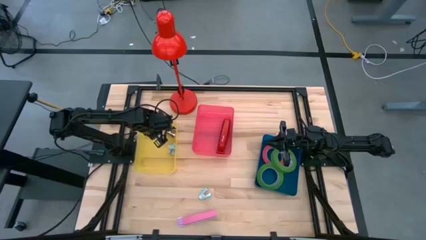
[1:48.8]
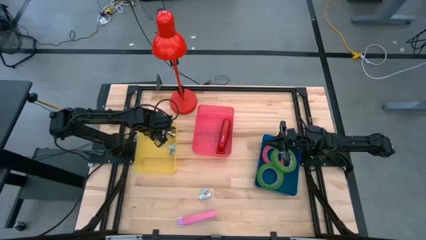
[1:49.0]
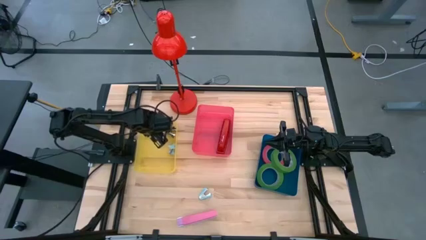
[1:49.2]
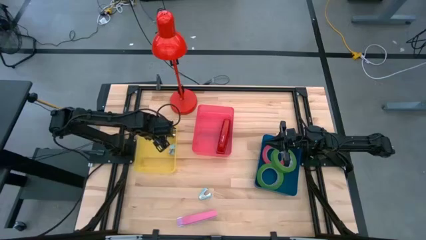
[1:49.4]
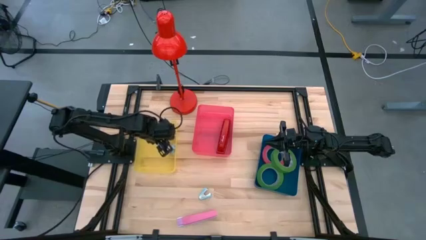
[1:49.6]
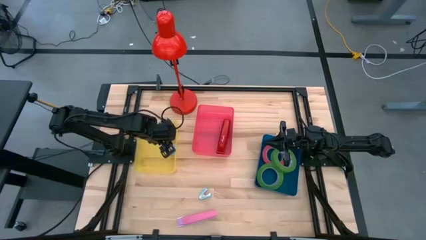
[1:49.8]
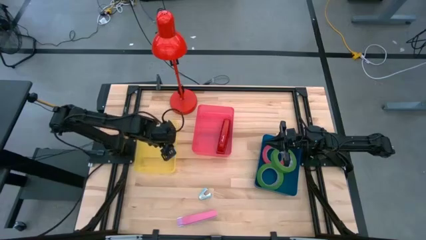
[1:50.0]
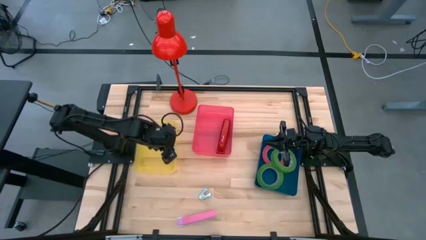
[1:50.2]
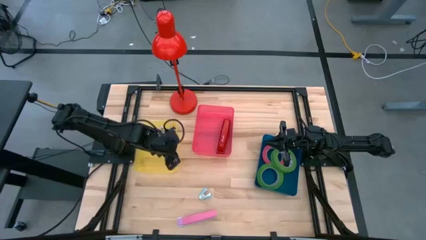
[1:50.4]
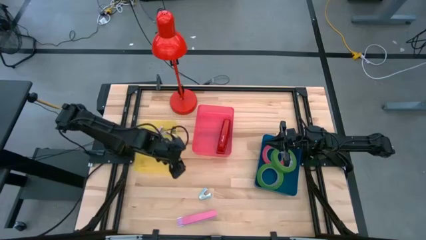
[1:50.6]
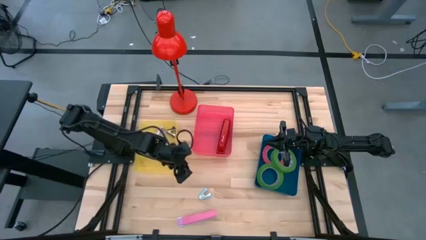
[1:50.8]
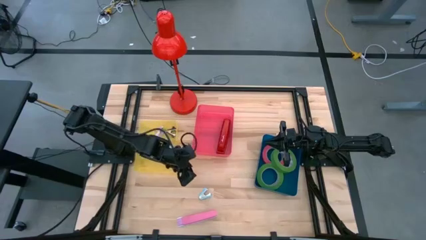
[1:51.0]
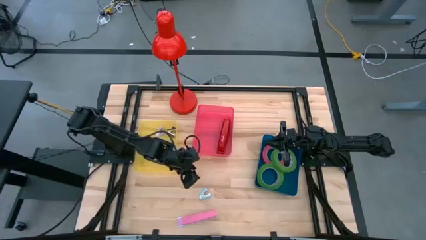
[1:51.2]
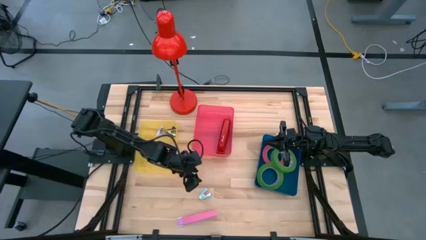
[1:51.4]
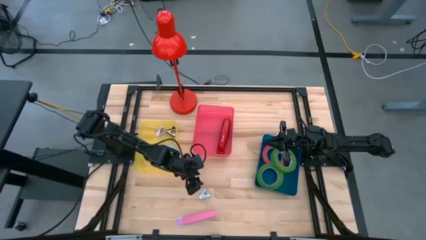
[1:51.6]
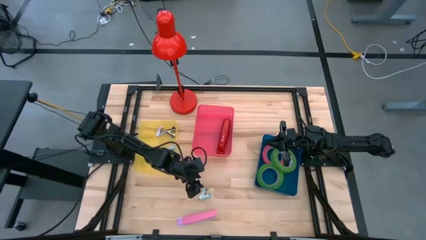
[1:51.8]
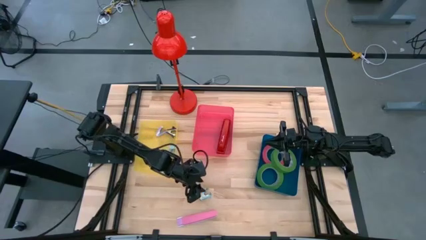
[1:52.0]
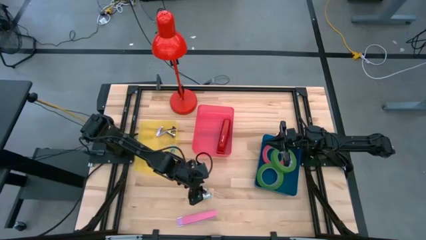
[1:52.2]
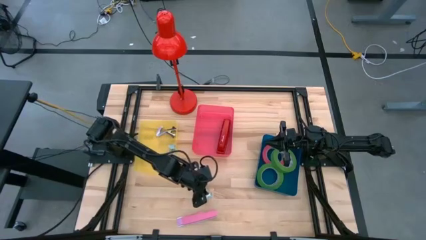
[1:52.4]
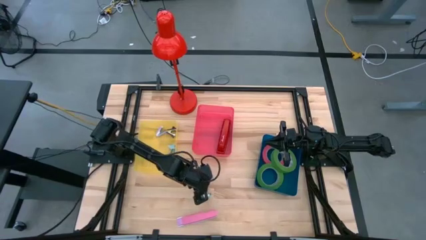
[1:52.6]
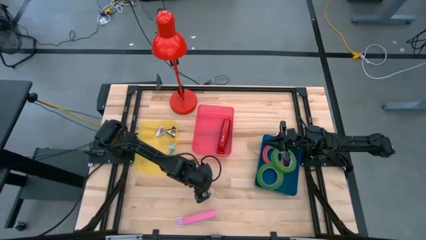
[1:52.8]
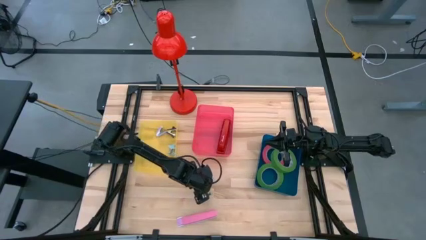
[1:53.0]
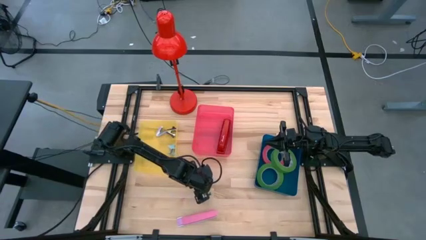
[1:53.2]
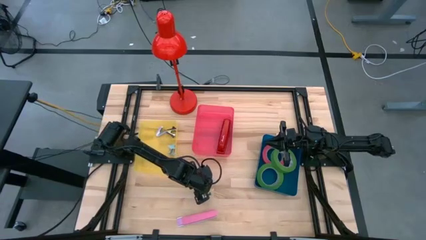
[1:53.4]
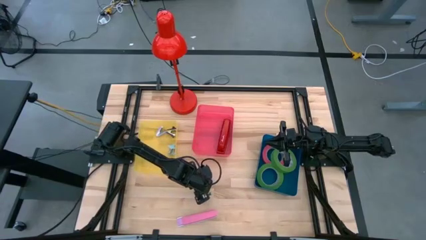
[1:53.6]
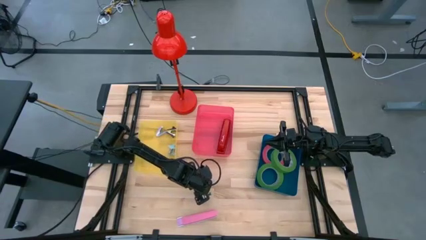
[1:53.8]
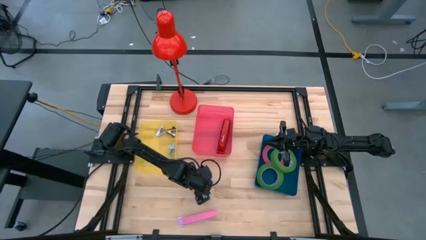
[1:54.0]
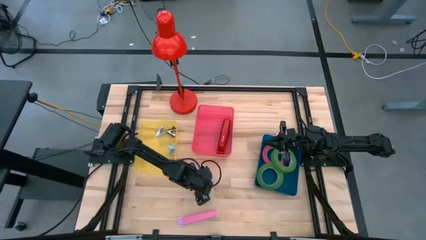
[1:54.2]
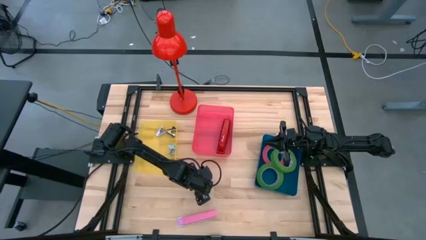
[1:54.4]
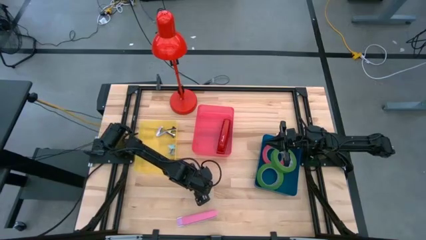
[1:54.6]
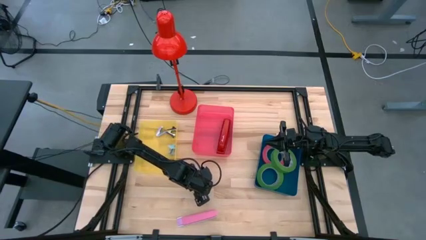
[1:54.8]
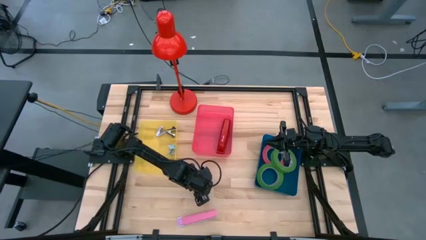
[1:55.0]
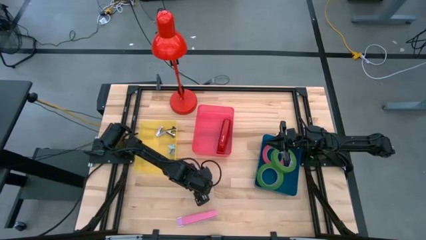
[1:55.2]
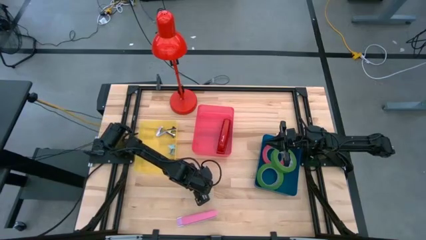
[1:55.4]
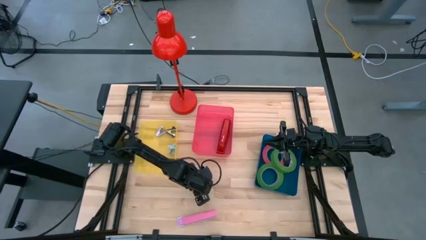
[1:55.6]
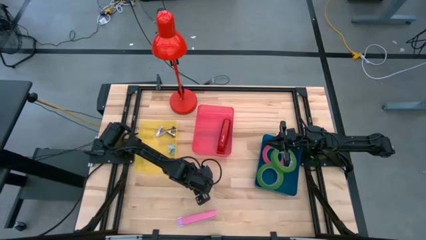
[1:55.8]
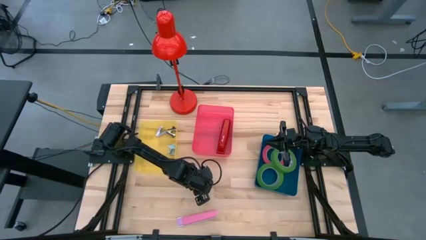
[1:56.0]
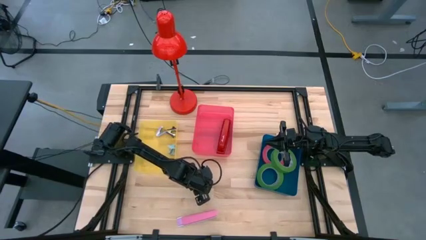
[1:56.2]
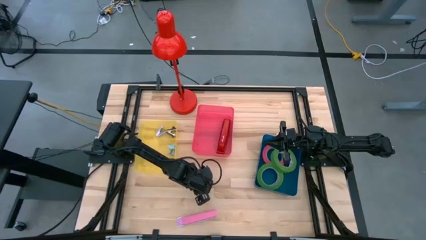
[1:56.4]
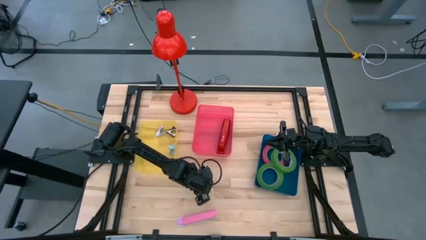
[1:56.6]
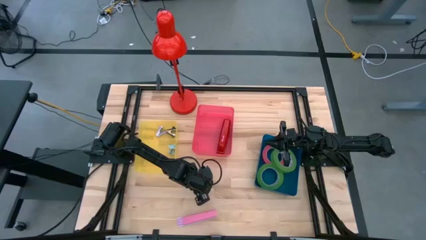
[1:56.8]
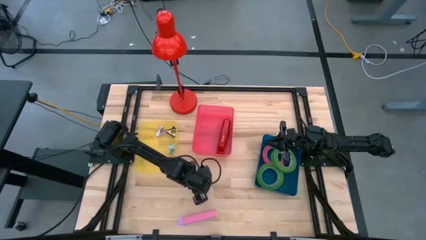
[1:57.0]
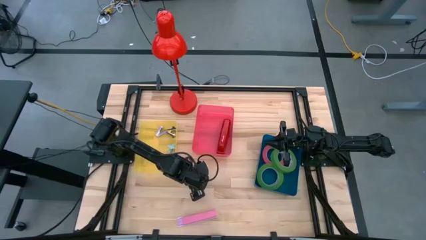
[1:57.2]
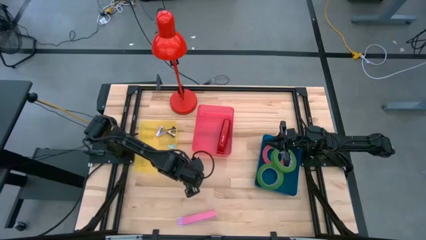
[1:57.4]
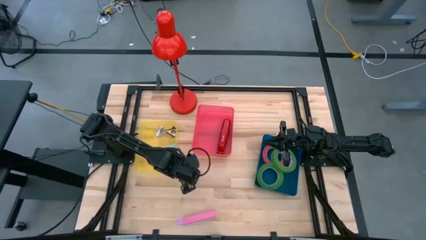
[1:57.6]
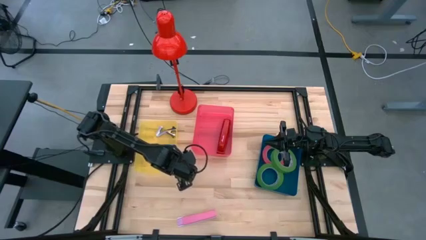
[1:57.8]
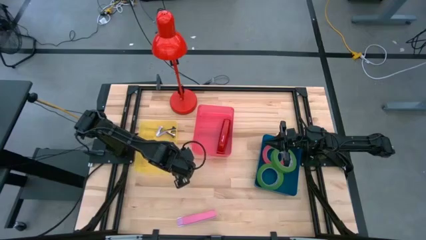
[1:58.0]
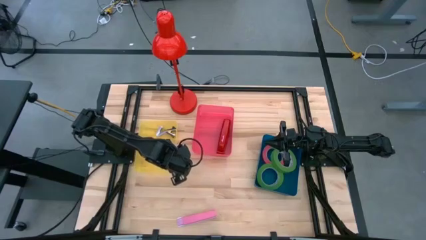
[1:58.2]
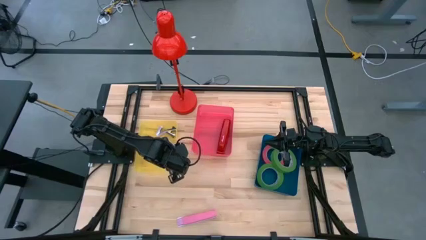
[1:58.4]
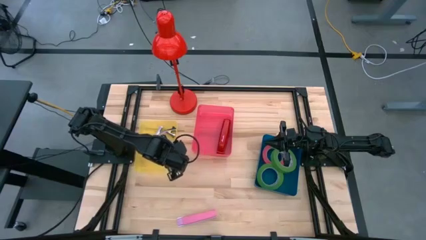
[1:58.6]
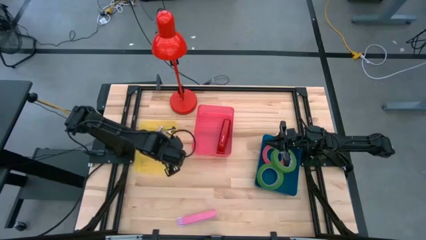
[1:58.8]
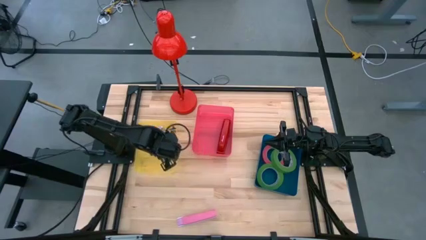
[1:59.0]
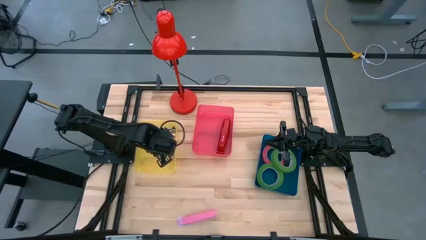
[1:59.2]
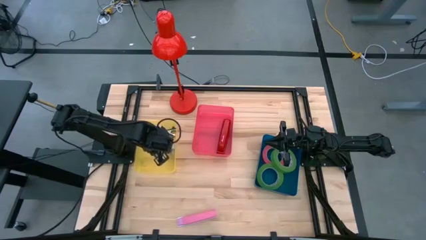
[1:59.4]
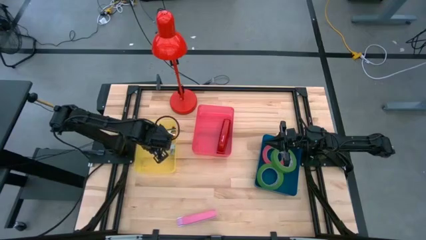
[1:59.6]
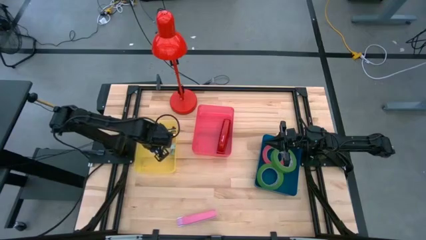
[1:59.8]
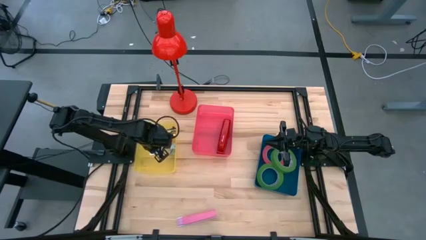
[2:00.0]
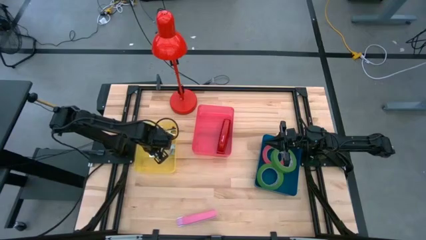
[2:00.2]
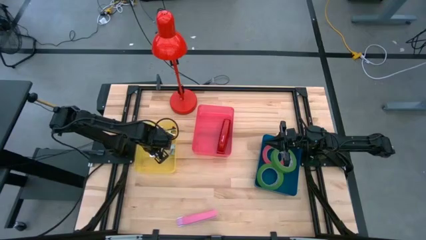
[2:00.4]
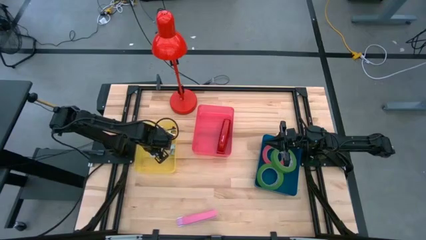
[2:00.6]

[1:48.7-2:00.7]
Task: Pick and place Stapler, Stapler remover, tape
Put the blue staple remover into the yellow bin

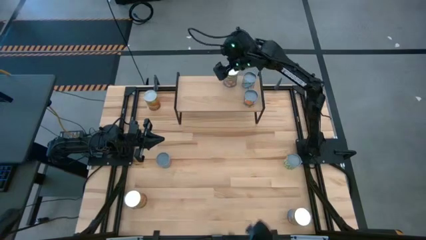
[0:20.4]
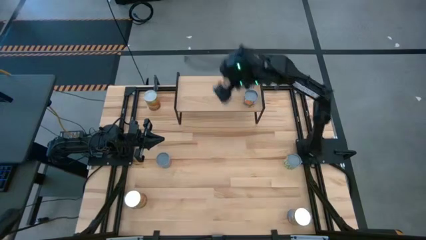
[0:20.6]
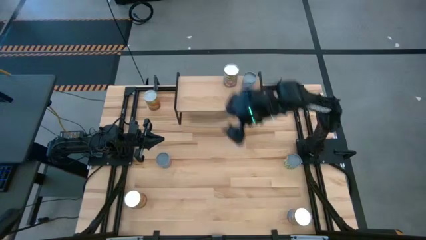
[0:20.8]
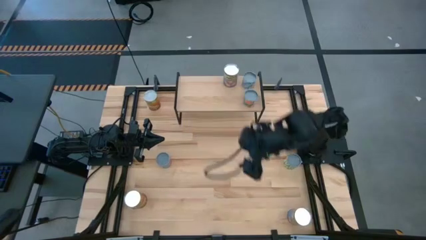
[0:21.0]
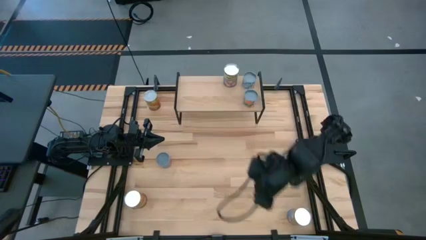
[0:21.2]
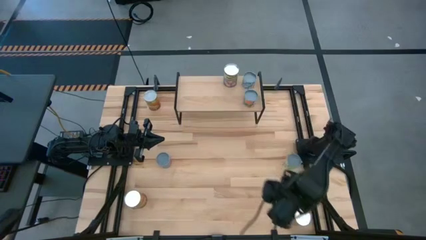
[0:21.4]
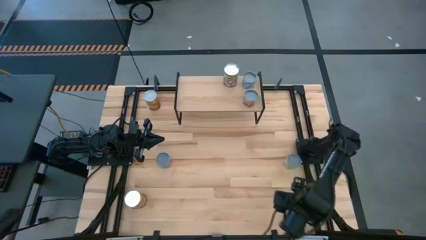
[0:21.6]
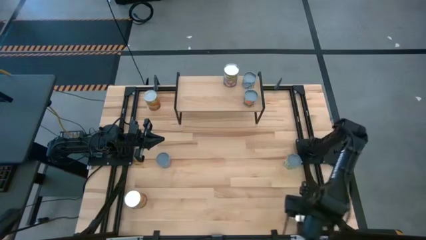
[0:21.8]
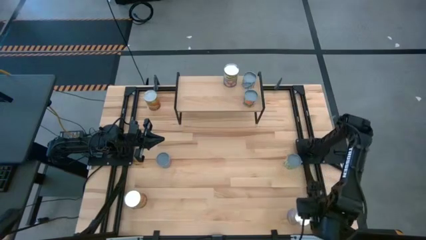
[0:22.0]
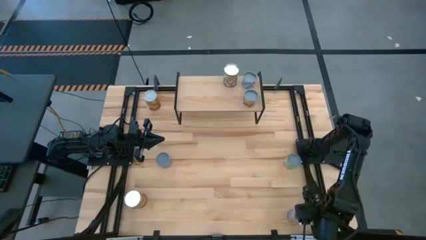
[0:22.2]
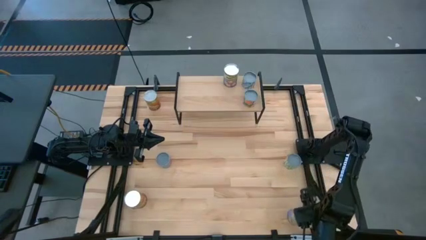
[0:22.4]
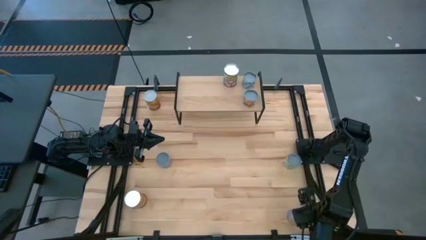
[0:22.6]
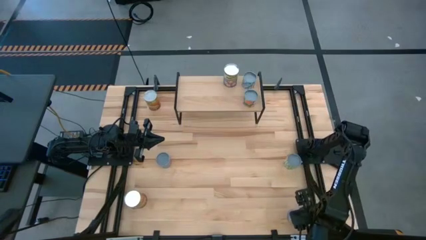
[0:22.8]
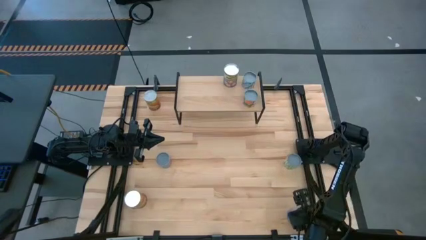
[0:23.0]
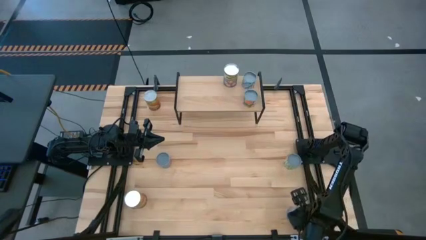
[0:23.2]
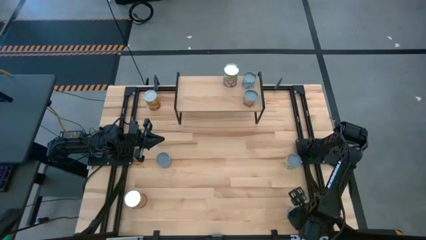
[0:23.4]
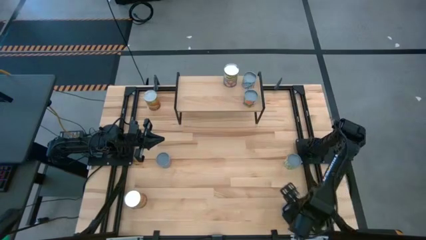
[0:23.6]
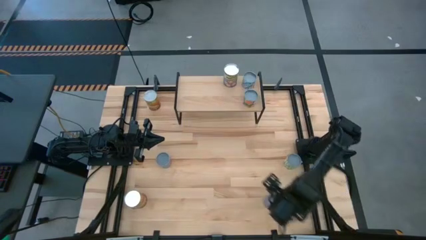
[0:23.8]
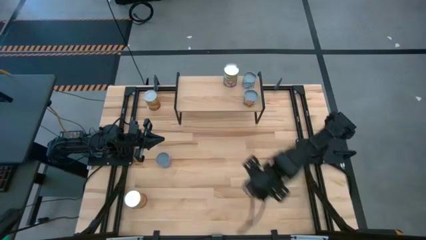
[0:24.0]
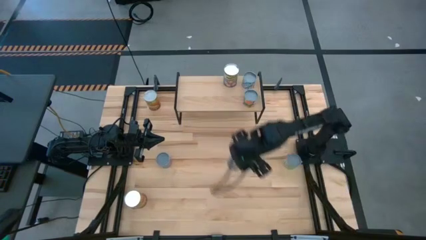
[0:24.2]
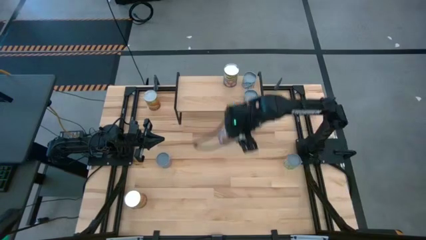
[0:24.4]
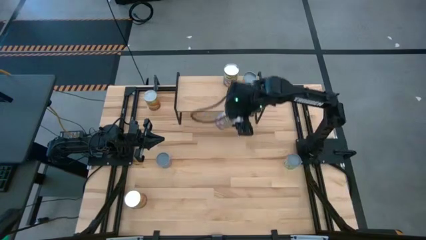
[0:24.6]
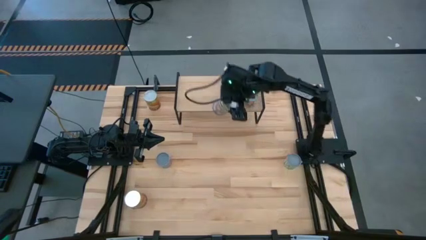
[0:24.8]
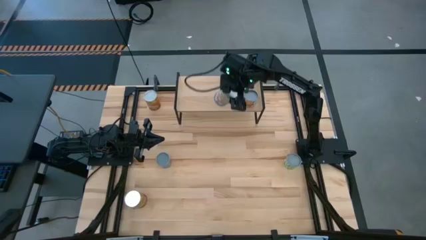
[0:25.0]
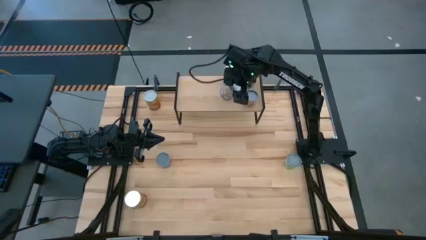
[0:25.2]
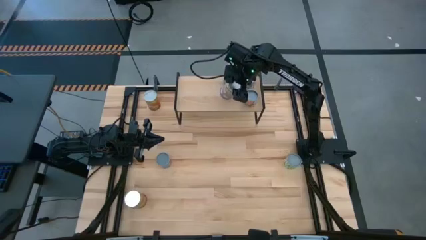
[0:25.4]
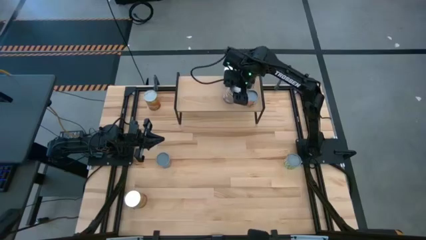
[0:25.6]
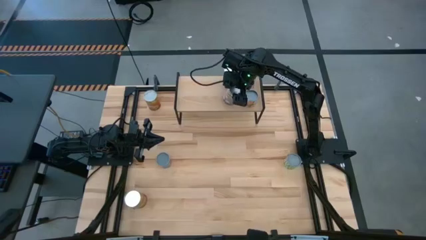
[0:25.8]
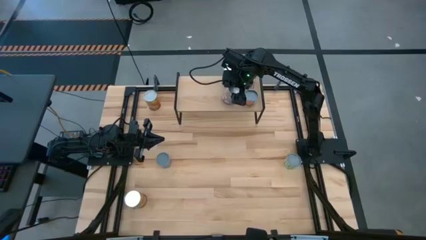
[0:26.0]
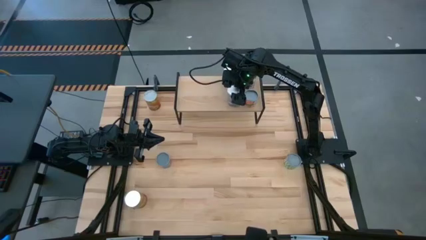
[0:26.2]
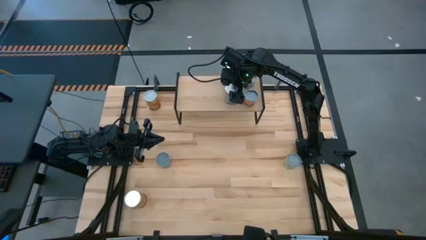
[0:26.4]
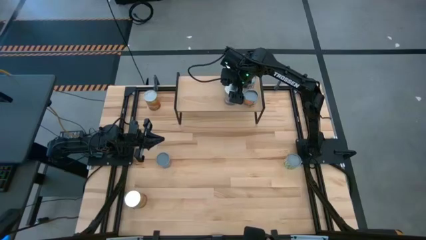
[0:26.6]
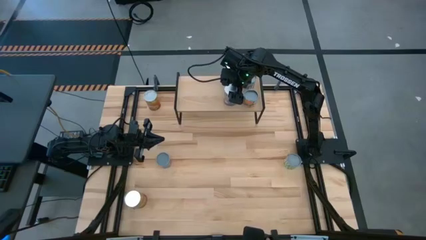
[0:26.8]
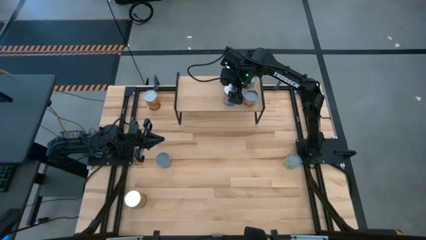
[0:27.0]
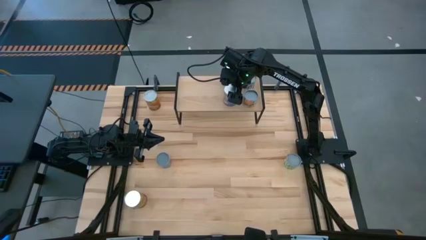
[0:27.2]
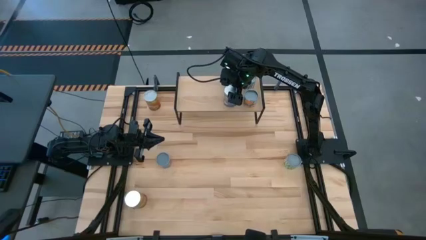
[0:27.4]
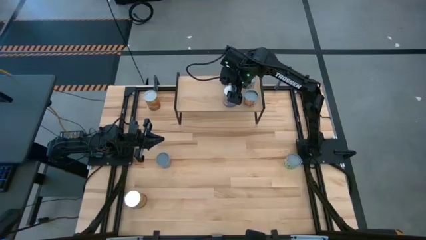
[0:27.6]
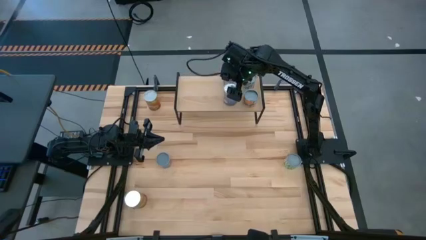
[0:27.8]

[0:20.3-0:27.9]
Task: Pick and place cans onto a shelf
Put the canned peaches on the shelf aligned with the other canned peaches
